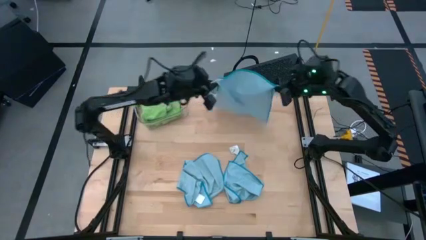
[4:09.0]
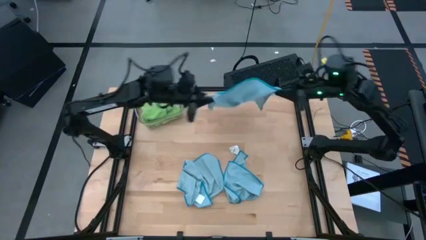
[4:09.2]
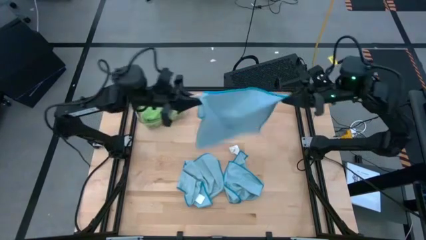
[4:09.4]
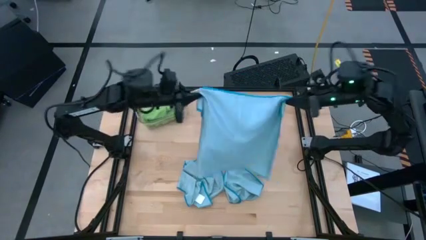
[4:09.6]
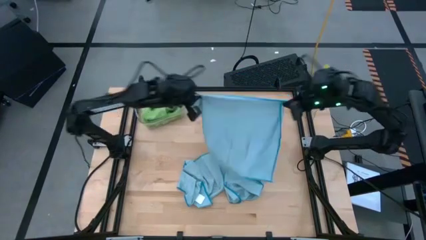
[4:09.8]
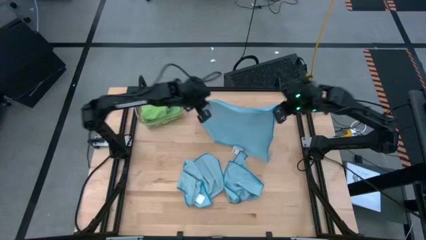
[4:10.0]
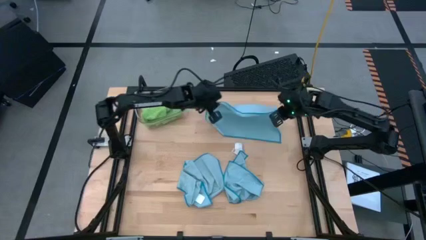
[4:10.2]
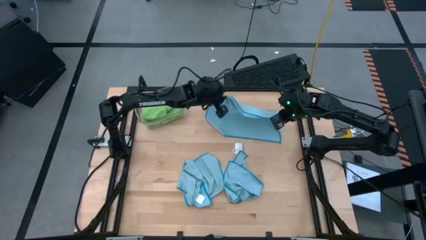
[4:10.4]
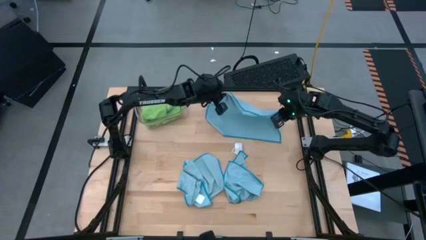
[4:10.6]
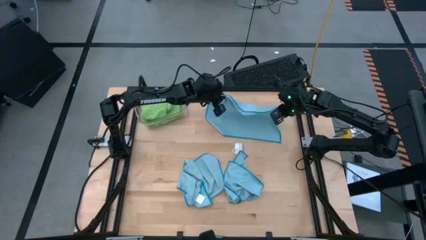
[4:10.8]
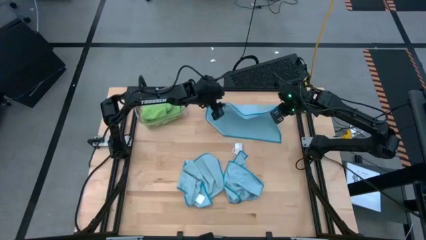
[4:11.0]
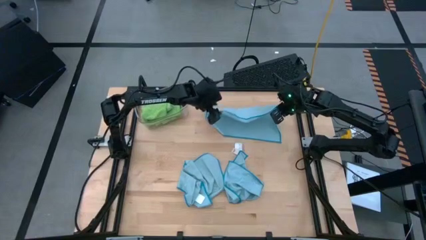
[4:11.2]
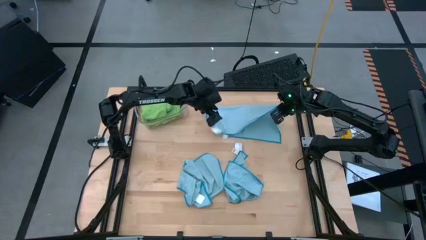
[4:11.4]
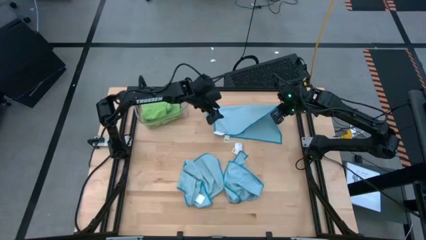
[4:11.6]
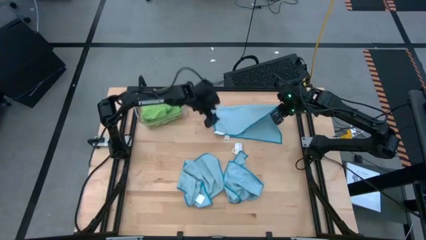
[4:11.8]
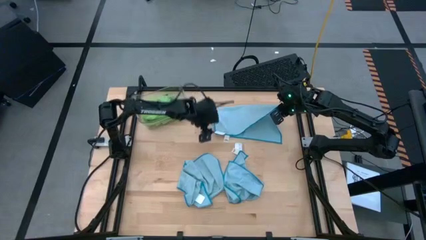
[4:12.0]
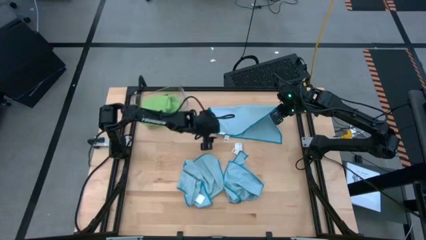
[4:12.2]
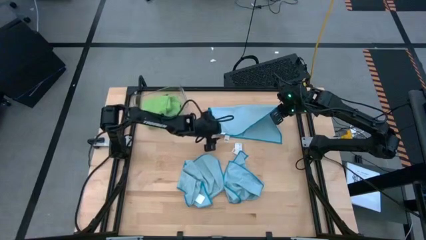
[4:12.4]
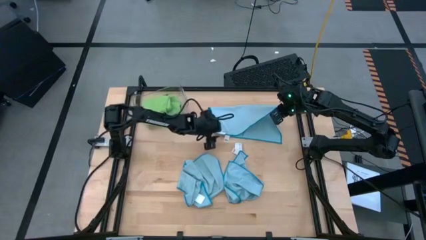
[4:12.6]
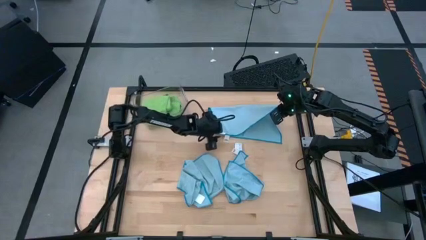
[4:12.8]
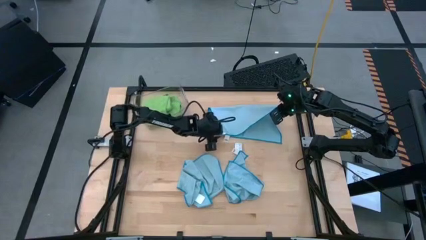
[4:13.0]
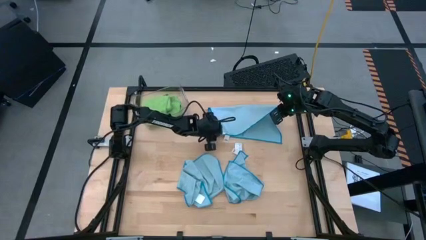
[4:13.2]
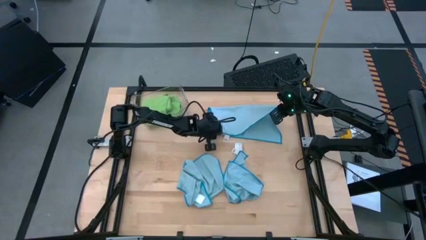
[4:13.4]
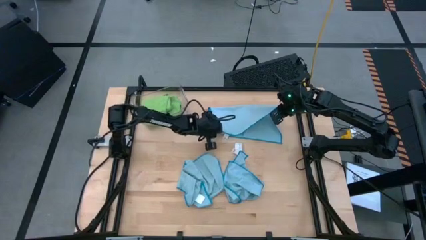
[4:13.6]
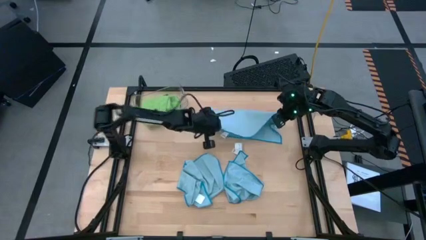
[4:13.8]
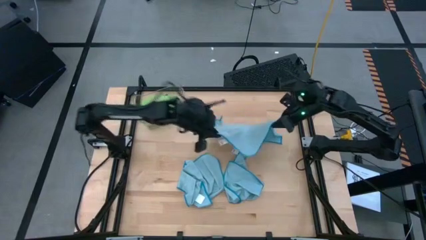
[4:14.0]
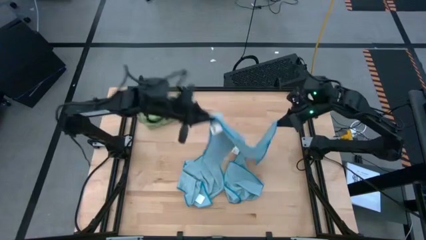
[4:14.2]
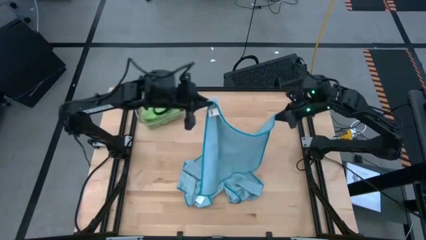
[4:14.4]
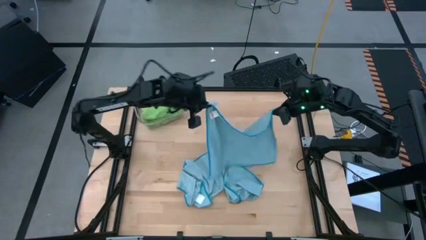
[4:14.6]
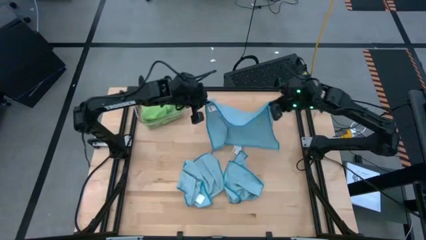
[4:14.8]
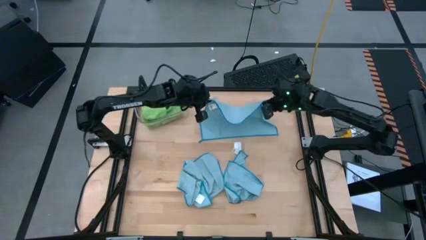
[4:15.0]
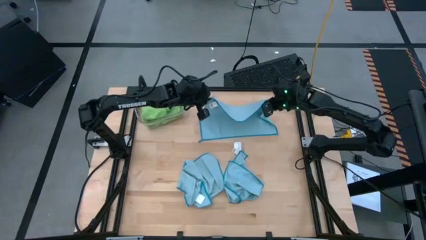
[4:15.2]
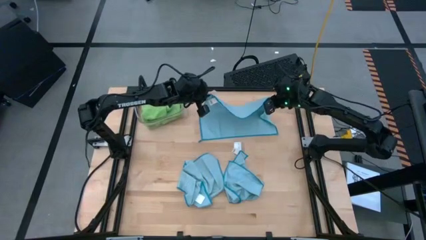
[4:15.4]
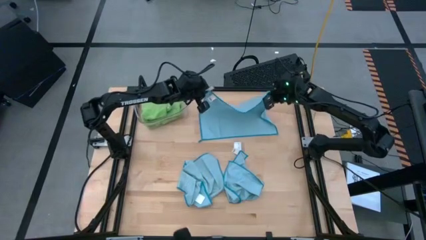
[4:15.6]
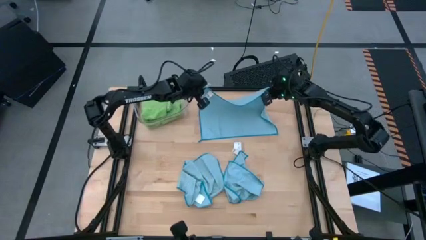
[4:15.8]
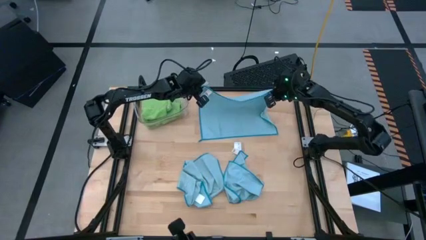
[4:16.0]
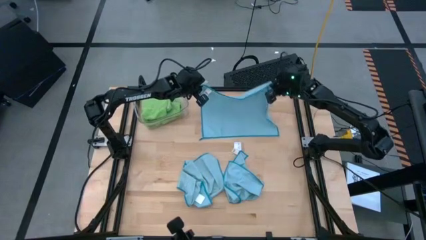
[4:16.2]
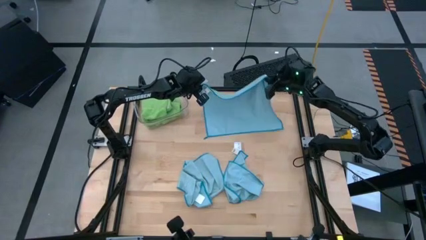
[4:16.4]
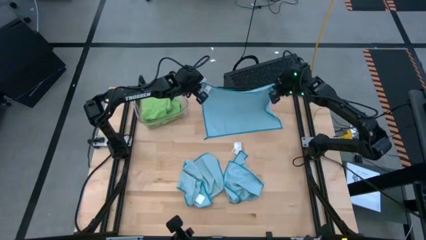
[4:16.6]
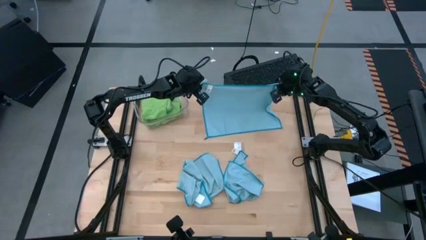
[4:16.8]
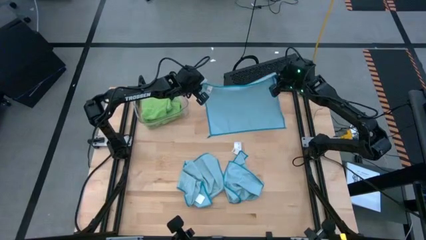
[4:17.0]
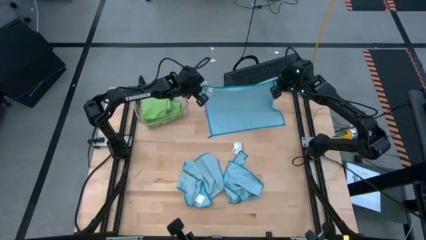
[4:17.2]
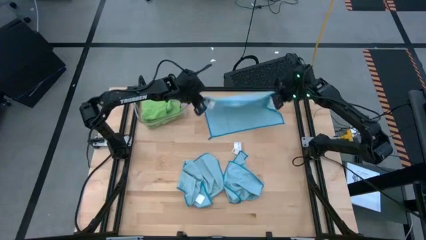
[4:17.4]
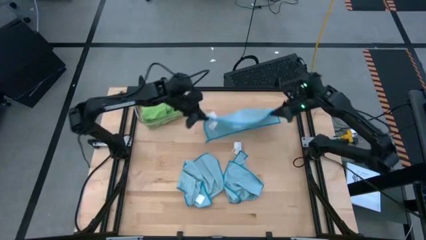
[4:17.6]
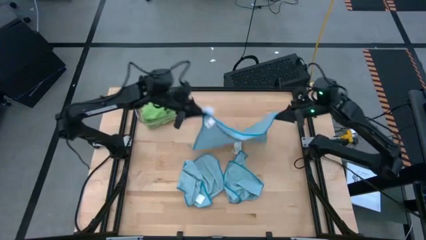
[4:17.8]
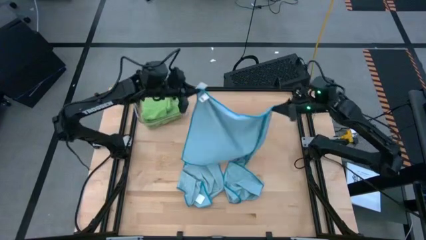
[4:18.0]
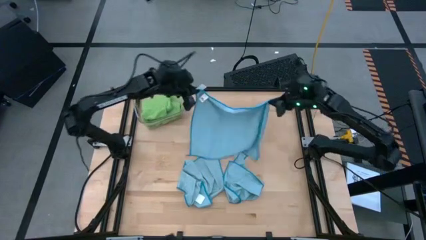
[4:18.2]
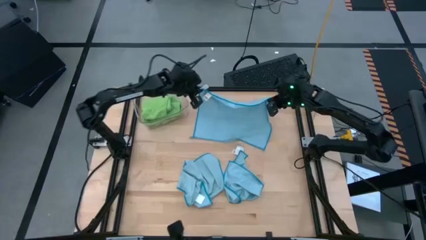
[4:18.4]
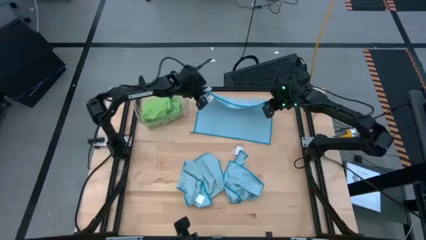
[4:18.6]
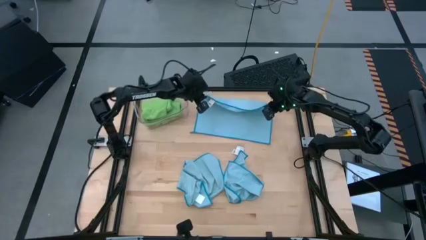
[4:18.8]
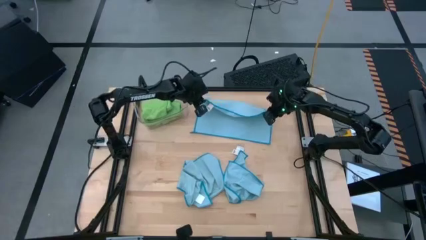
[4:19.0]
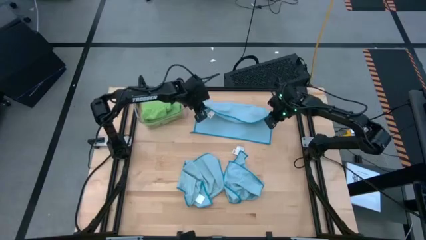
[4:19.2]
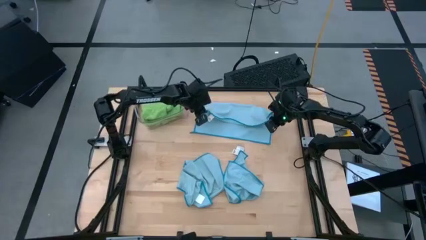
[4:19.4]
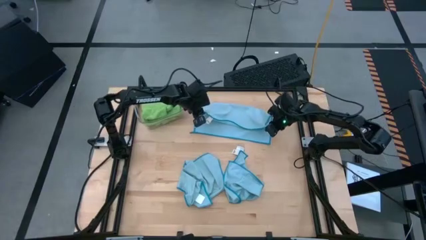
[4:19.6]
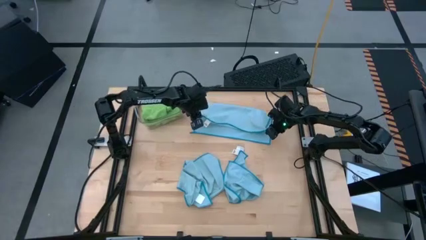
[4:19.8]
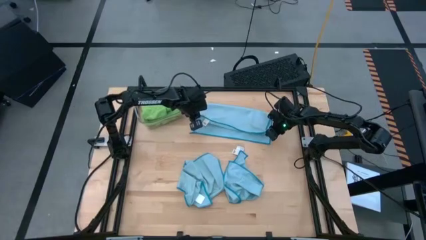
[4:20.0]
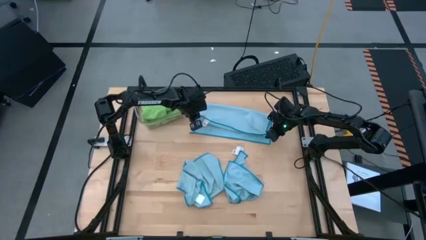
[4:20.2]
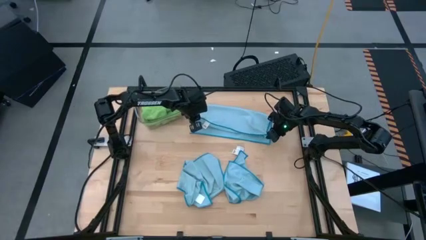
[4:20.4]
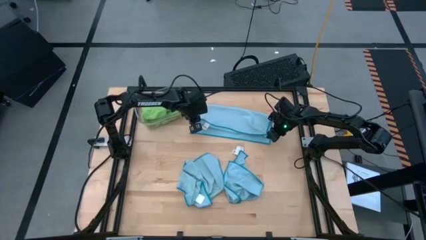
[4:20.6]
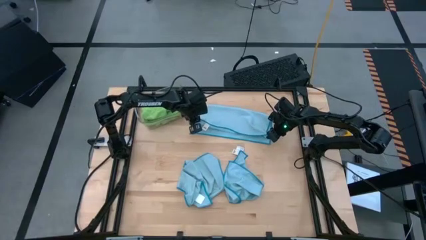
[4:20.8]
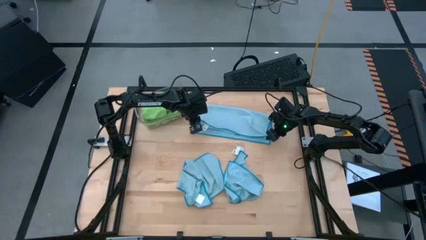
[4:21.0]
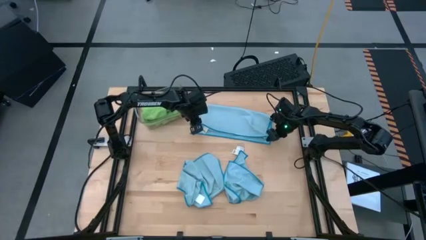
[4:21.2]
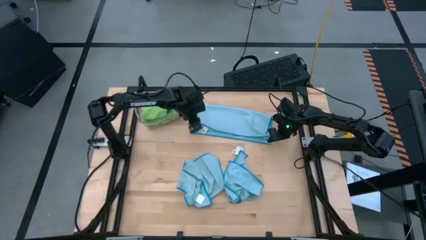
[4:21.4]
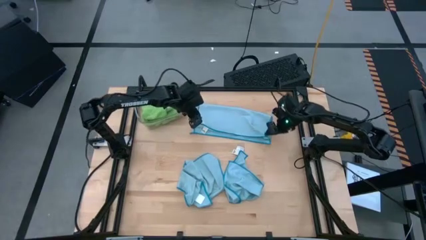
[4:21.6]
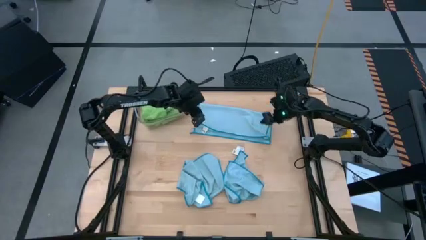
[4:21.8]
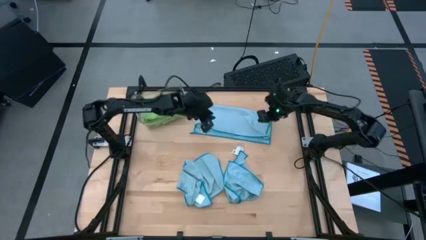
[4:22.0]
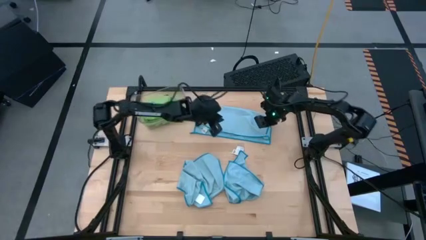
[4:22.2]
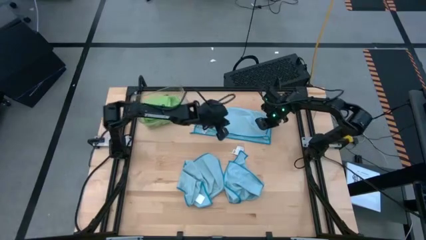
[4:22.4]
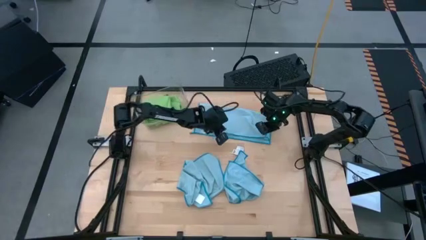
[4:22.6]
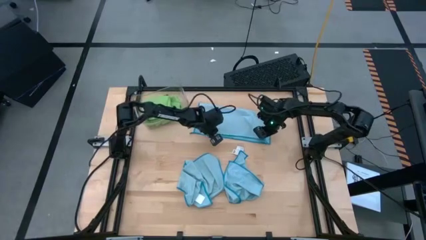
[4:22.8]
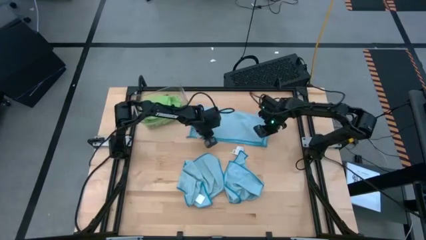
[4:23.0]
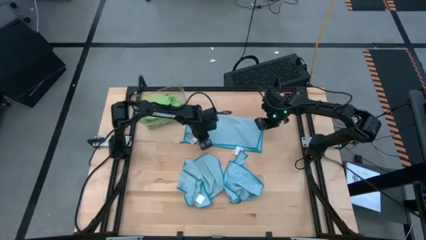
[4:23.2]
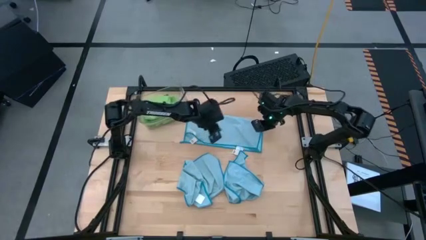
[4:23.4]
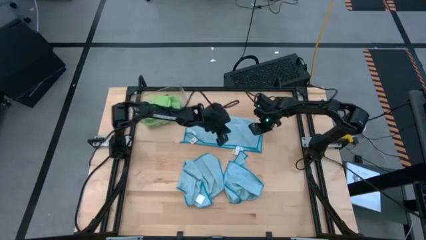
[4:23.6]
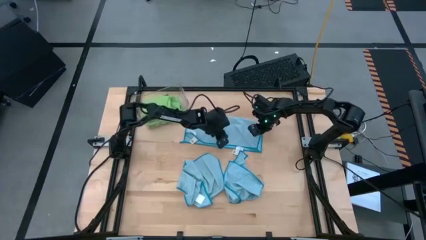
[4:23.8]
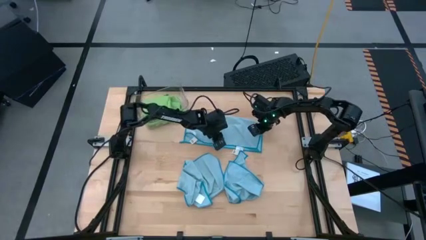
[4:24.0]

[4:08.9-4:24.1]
Task: Fold microfiber towels
Fold the top center blue microfiber cloth
